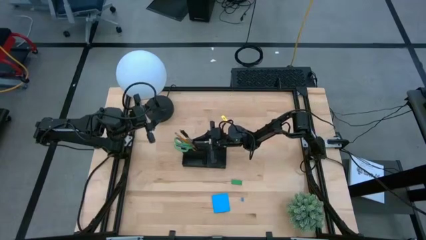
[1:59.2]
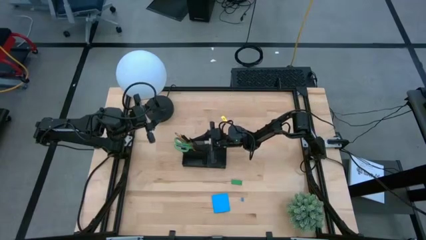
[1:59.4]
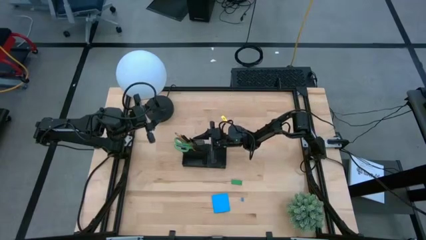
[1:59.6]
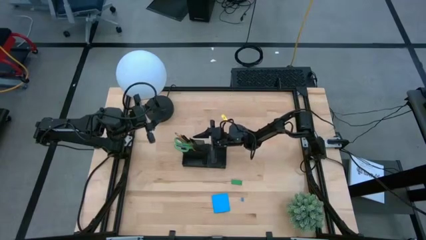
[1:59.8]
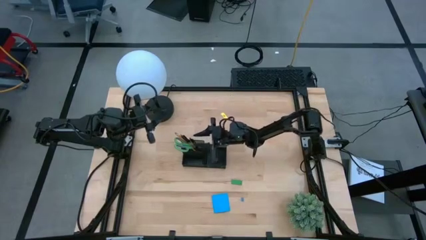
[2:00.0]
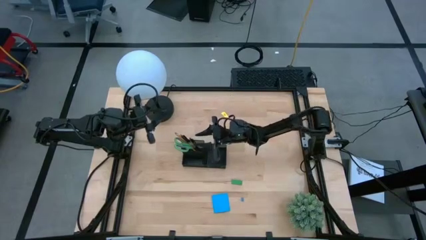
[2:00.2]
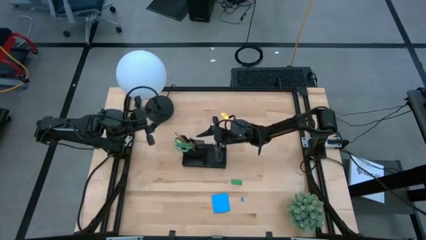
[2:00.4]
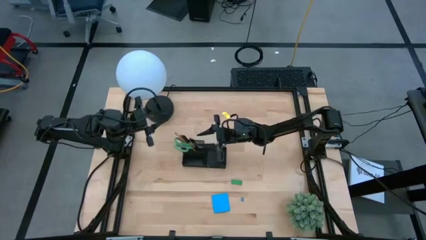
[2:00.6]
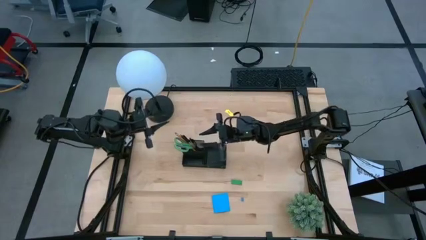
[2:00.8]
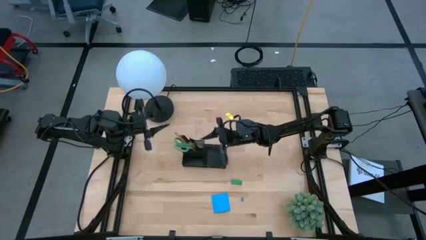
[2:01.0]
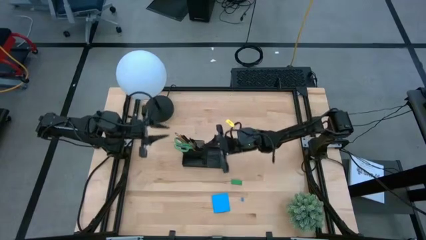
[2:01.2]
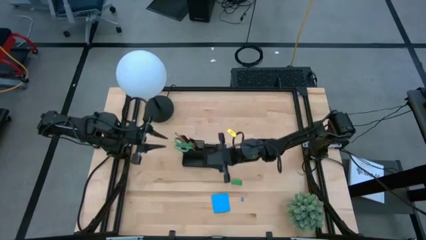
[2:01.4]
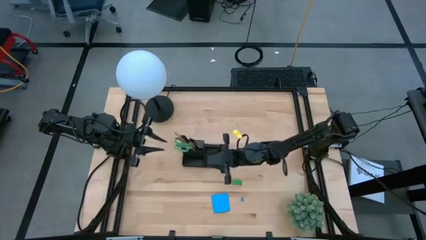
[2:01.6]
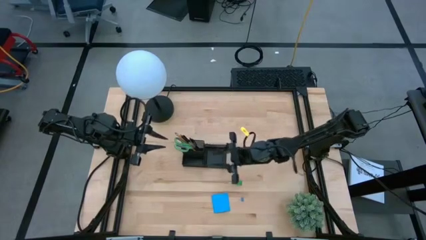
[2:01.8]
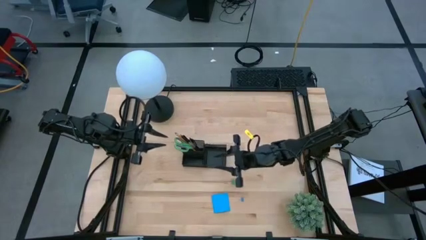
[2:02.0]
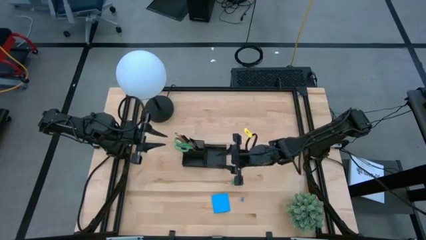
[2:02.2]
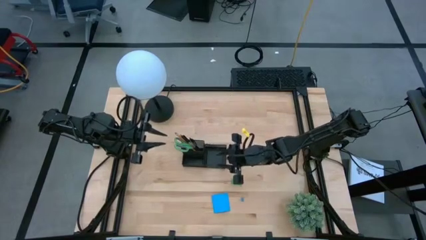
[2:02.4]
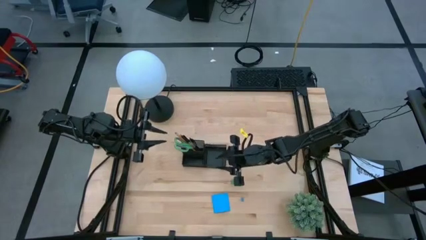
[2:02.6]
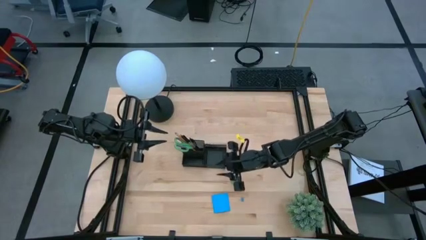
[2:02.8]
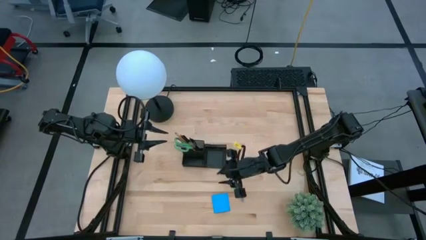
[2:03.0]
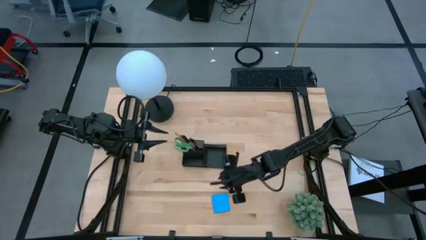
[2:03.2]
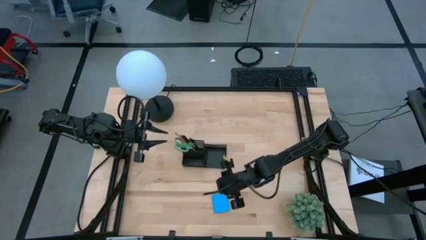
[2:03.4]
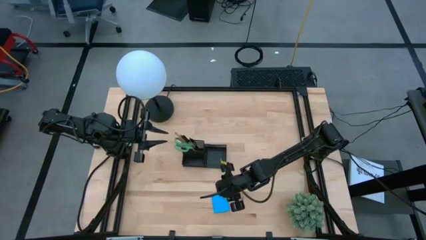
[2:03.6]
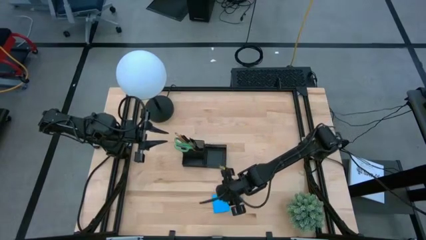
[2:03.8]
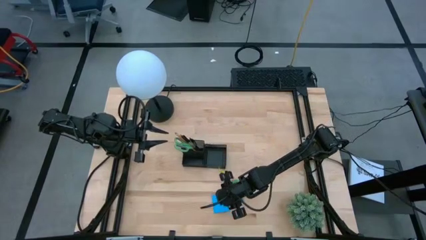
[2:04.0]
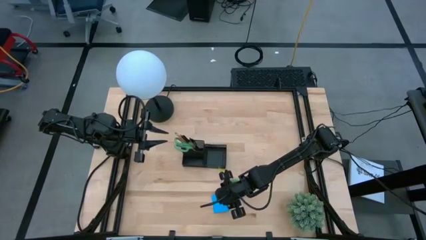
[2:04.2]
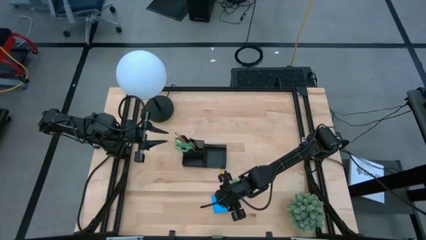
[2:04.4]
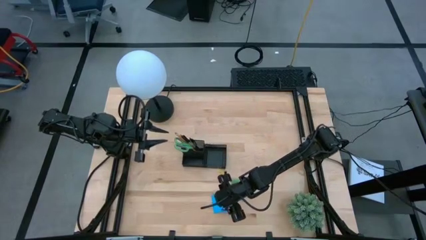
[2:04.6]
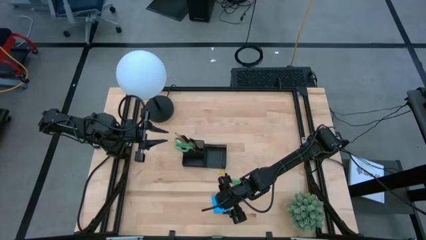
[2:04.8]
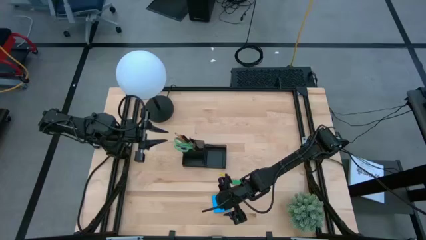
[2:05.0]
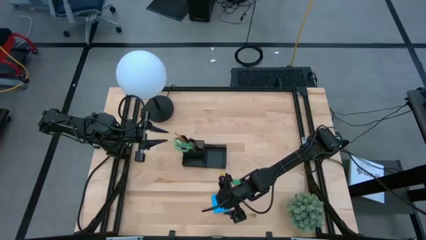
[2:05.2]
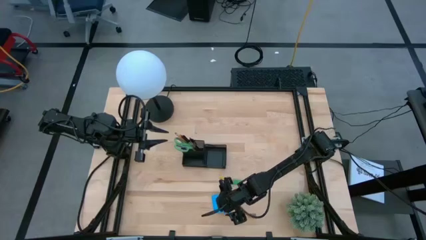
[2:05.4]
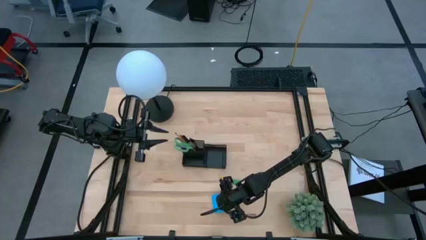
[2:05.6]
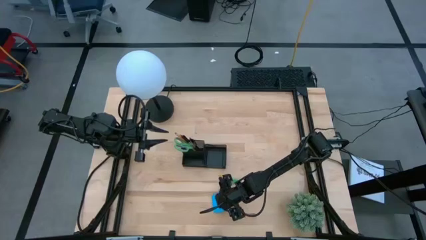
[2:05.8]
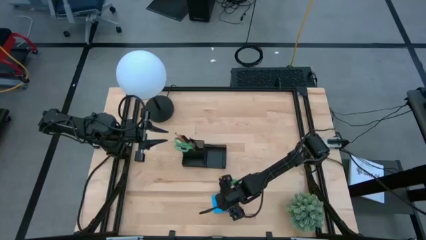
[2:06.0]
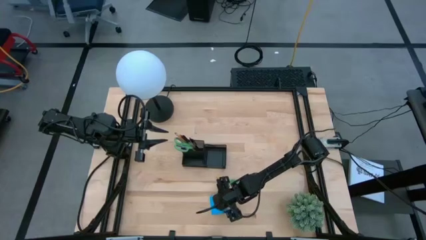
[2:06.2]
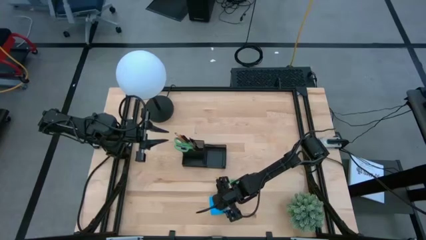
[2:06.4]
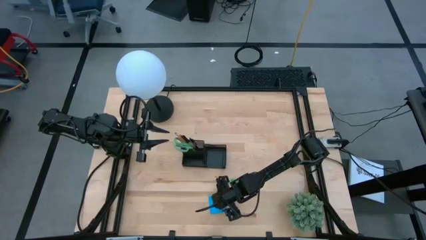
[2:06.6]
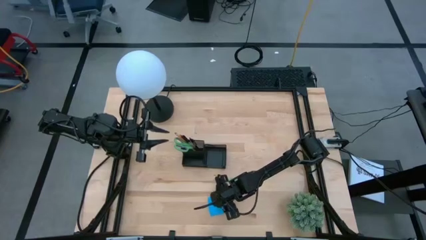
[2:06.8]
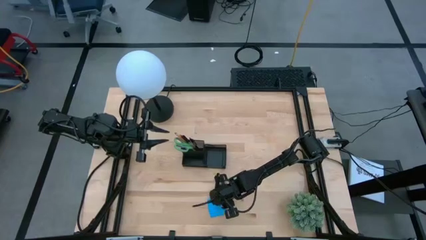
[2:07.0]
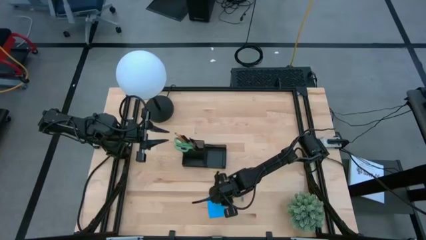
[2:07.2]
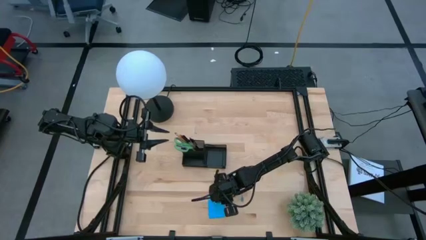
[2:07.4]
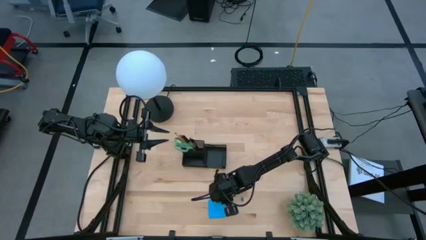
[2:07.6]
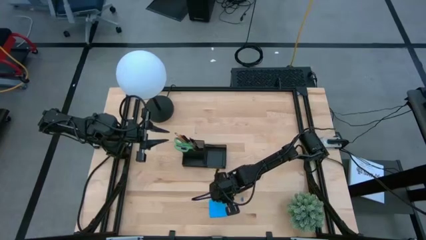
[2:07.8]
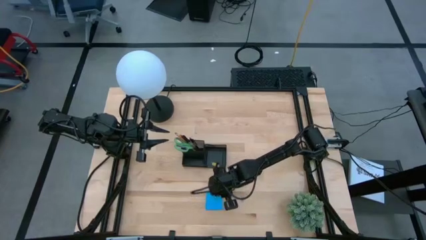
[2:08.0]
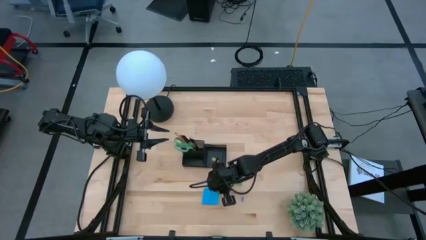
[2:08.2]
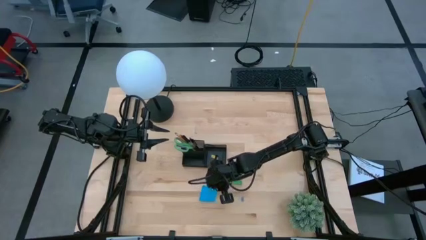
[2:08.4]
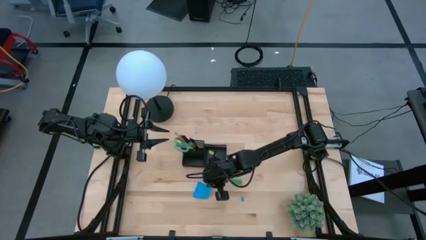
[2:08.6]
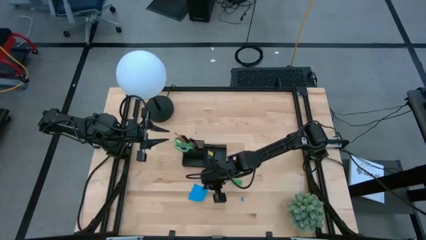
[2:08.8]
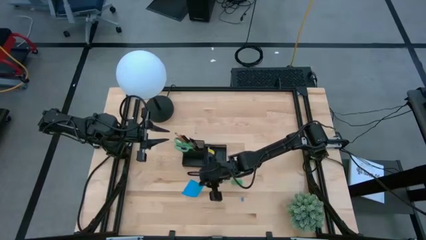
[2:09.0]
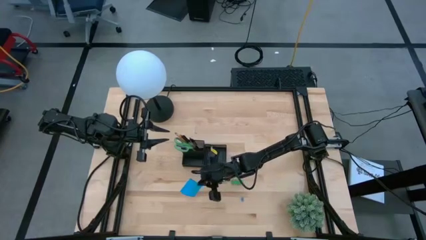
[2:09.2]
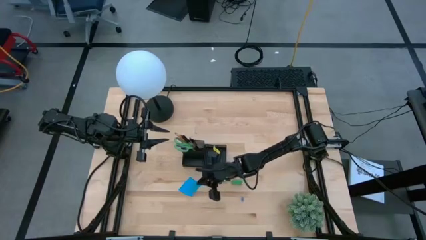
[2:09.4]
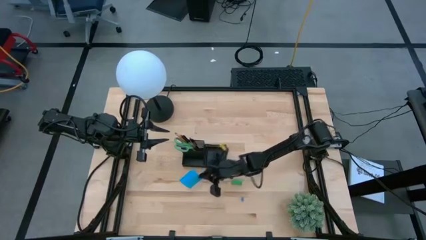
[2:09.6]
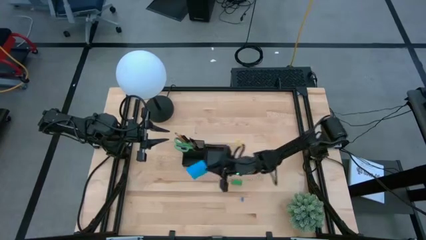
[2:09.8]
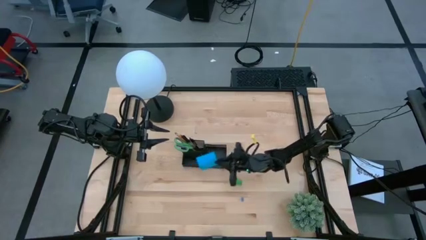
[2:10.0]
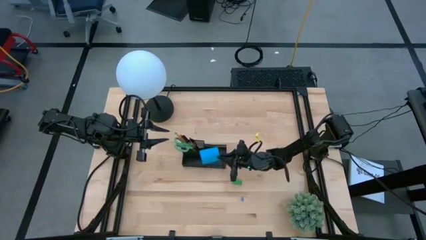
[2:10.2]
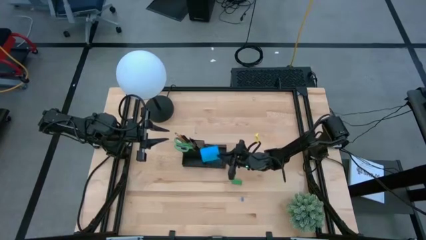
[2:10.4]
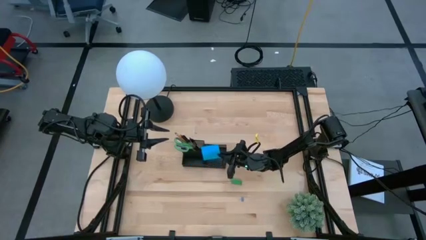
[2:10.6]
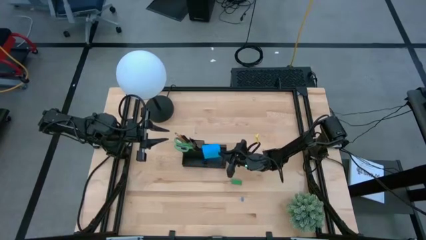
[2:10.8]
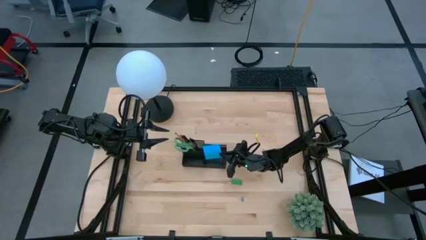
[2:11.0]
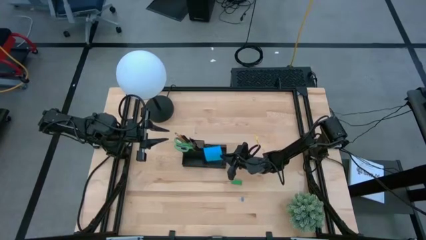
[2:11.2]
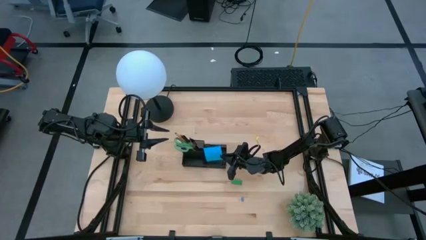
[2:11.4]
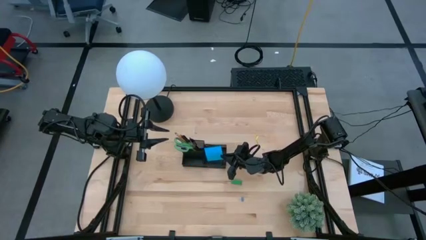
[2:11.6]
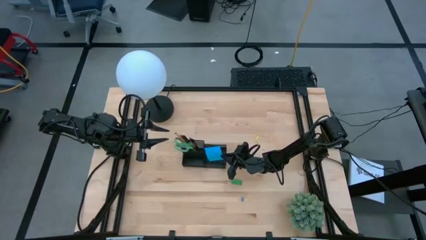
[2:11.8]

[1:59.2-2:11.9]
Task: Pick and place office supplies into organizer
Put the blue sticky note into the black desk organizer

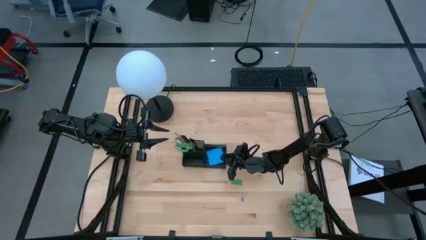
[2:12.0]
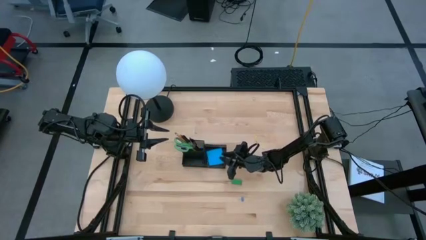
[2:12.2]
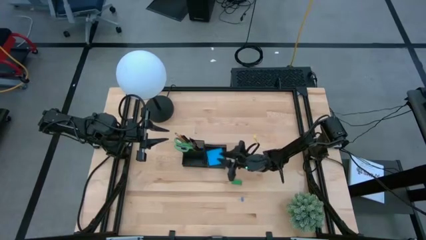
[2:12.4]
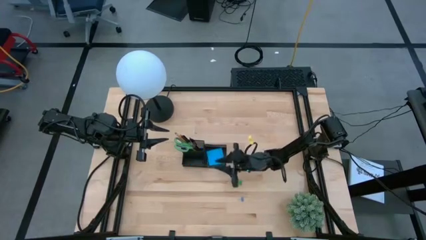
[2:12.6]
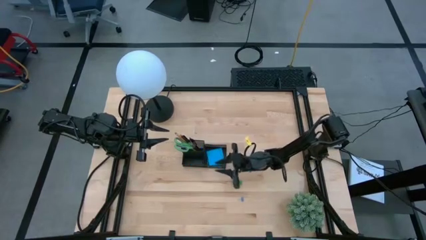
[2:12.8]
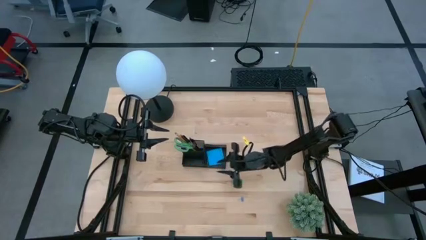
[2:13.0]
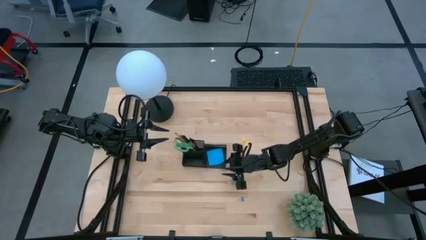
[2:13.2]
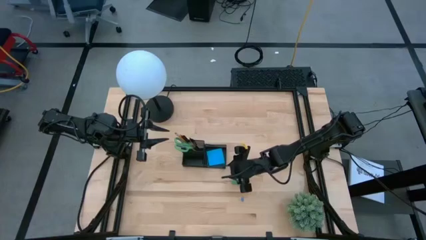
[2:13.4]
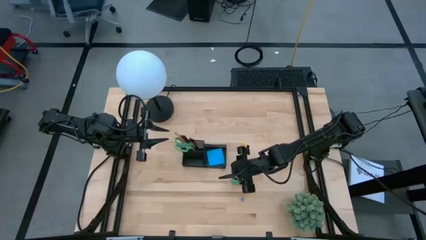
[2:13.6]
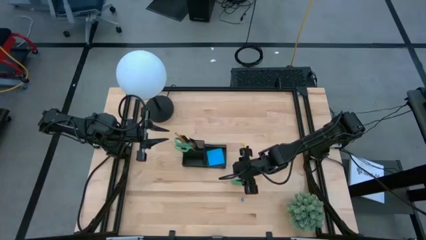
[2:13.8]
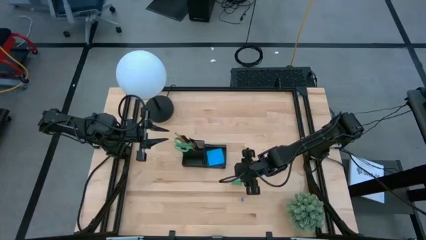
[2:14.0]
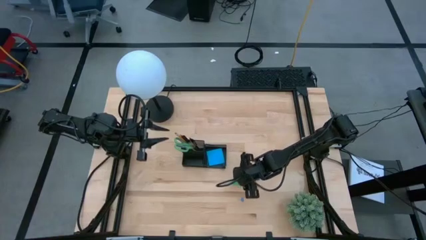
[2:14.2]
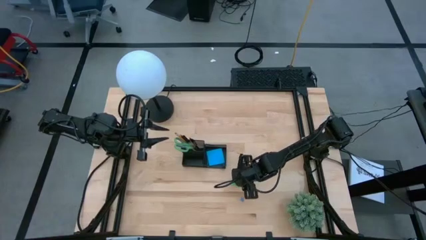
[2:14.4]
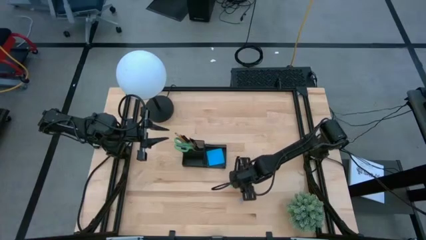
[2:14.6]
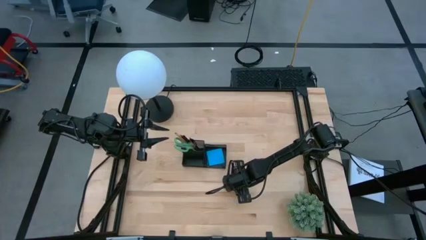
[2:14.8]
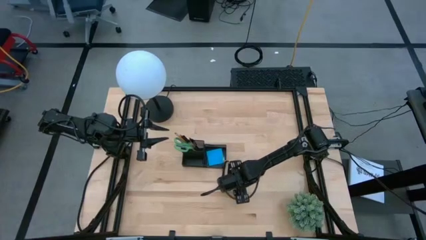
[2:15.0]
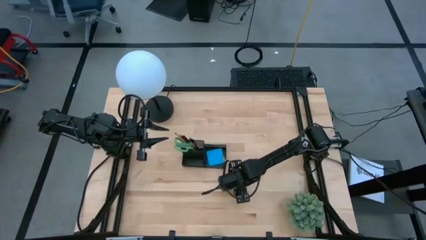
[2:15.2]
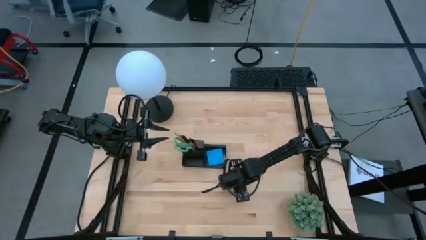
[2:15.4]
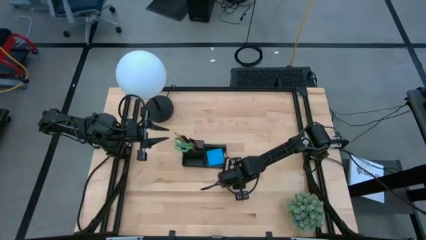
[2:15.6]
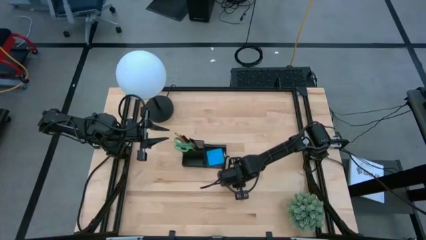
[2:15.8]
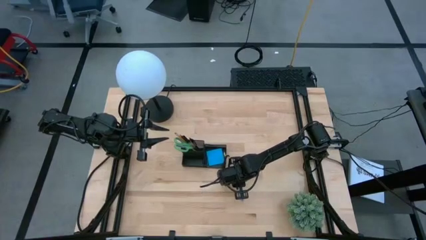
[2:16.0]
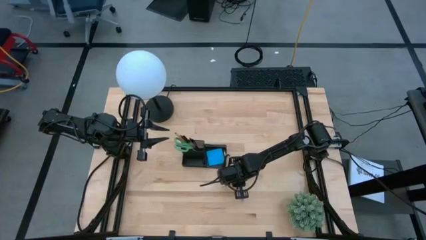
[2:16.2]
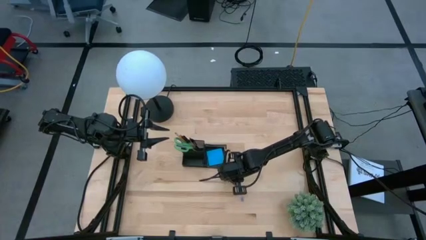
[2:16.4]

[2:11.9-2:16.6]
Put the green eraser into the black desk organizer
